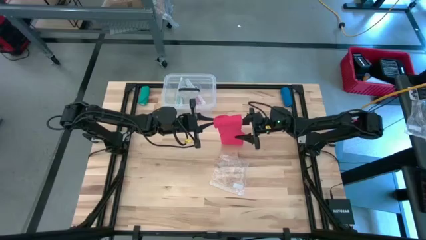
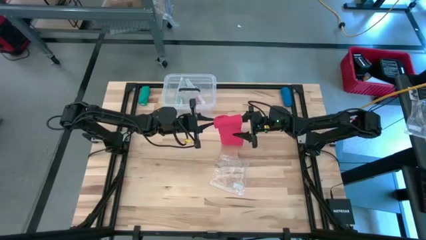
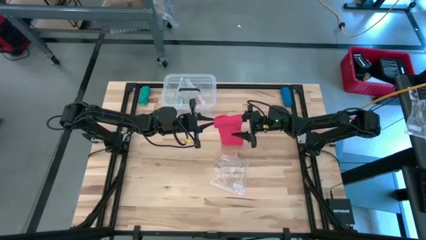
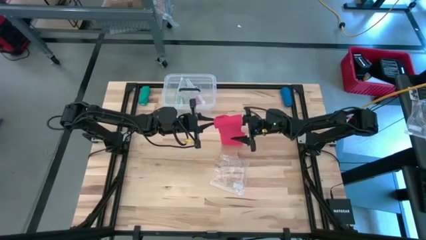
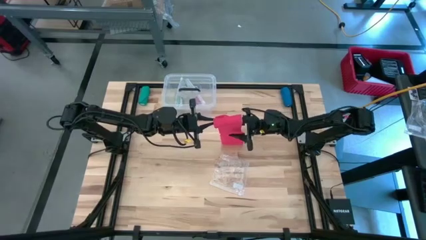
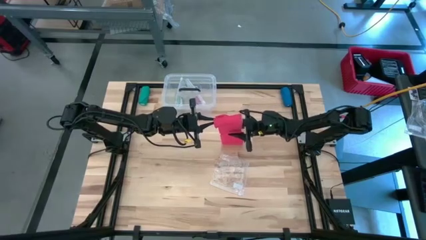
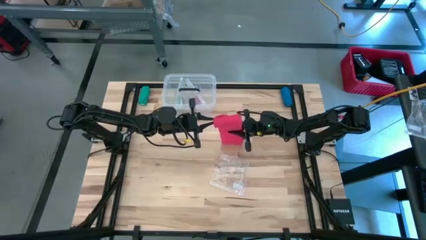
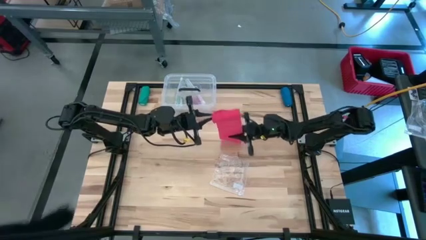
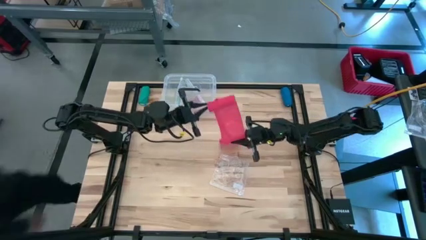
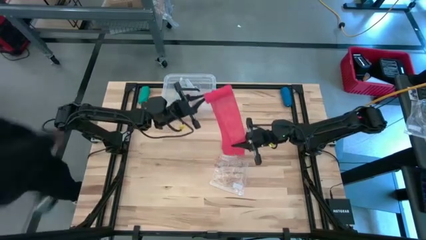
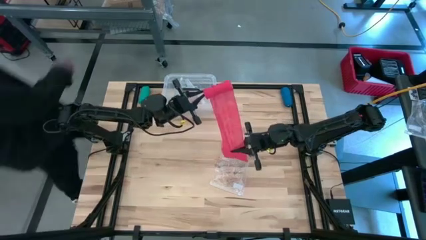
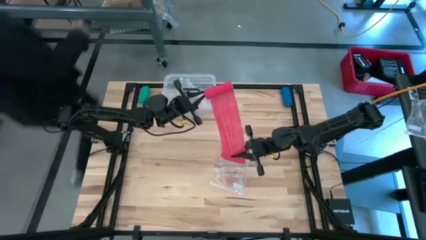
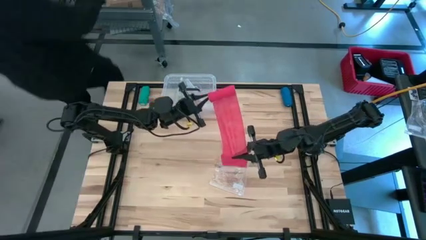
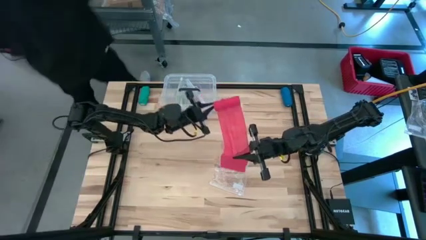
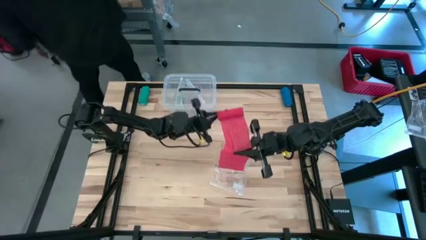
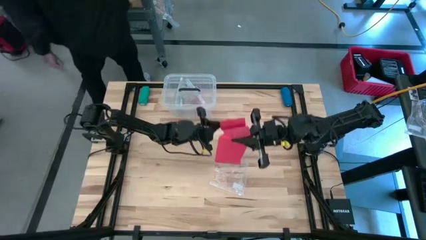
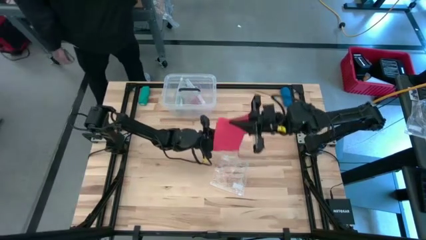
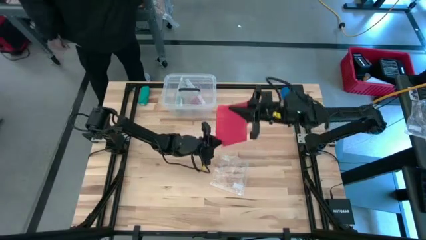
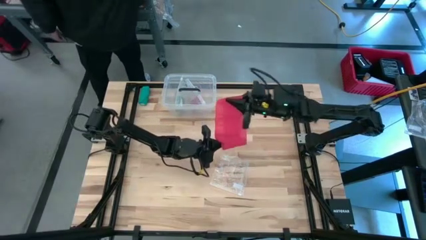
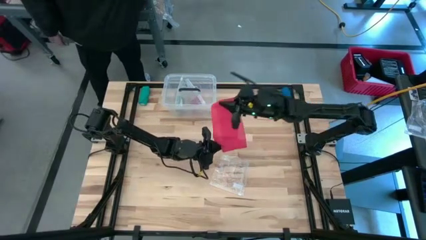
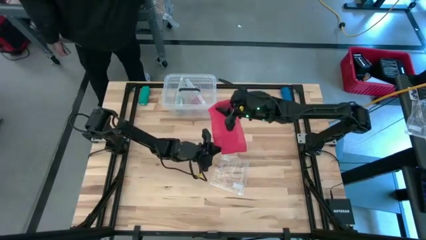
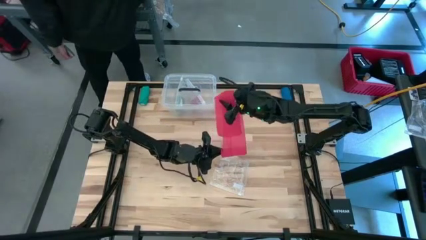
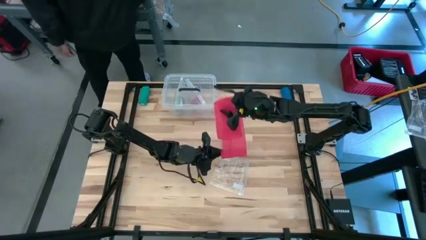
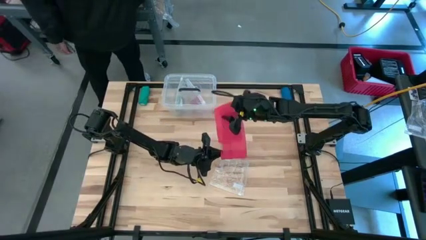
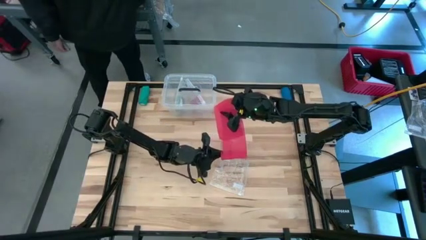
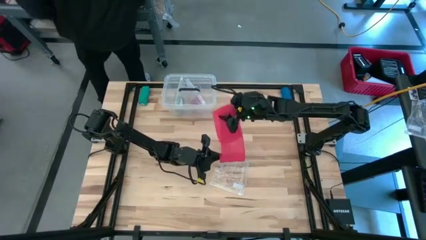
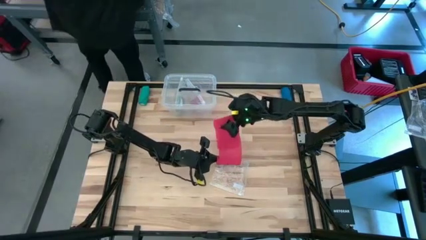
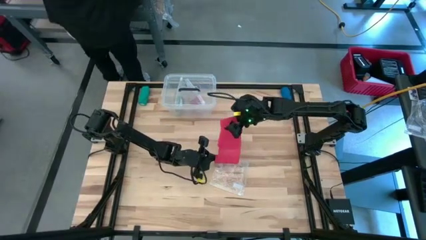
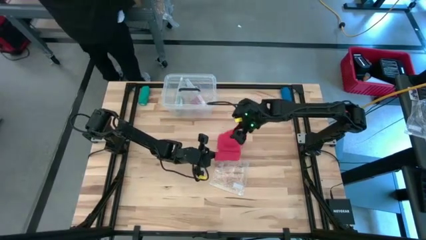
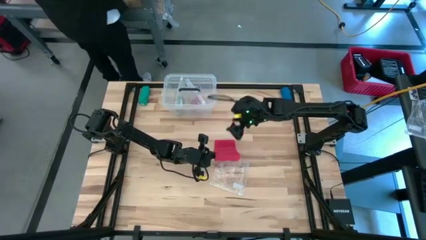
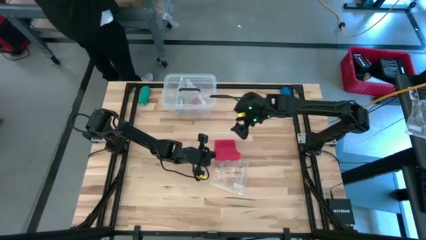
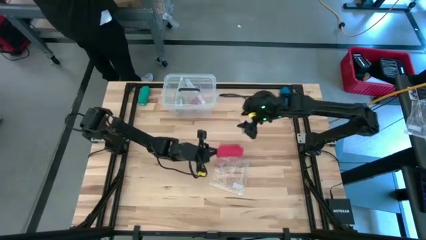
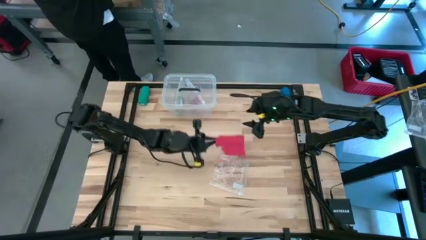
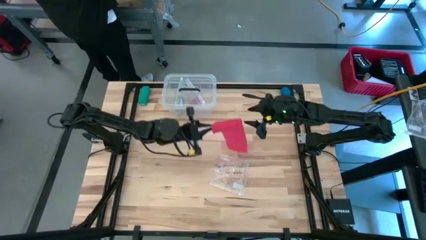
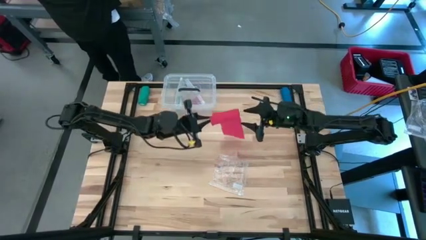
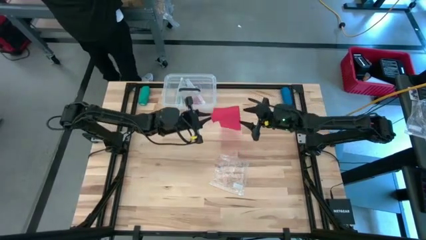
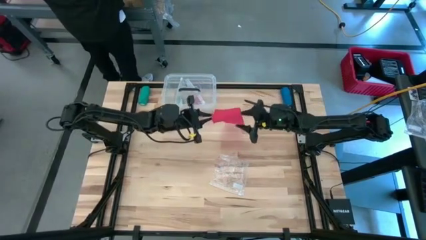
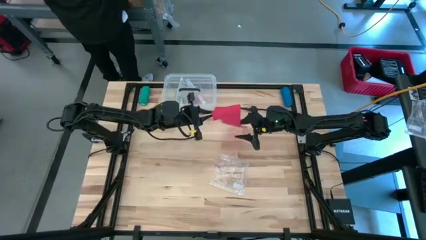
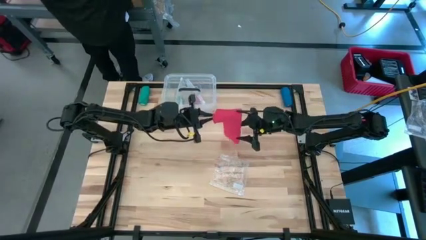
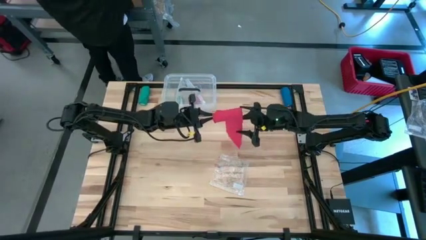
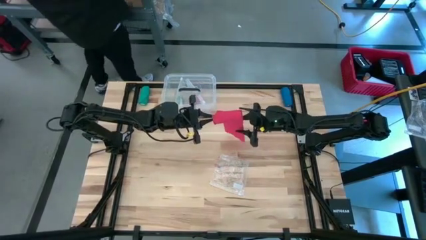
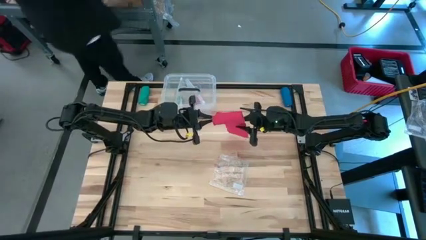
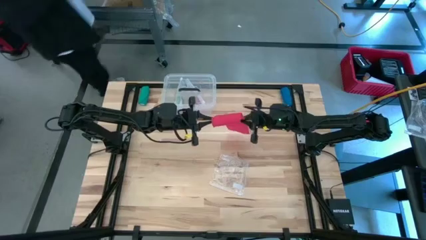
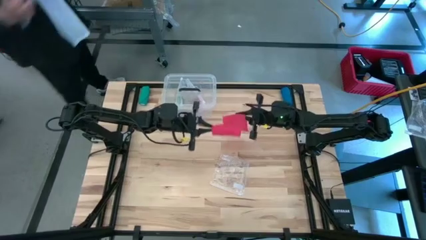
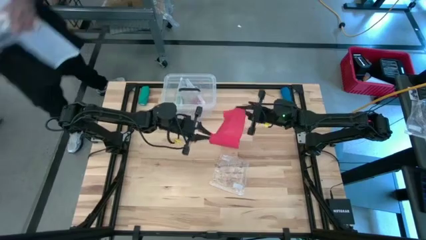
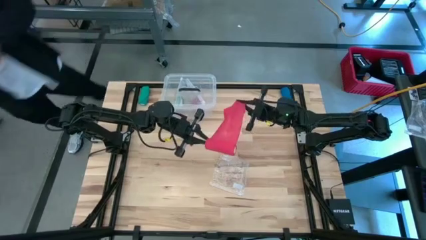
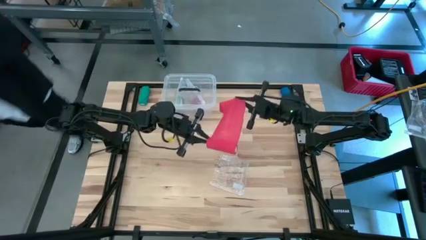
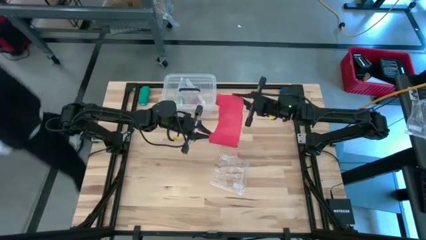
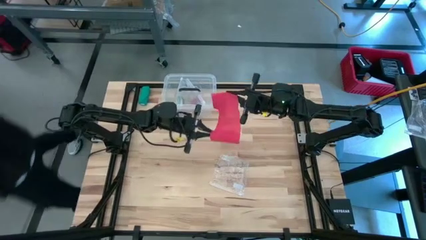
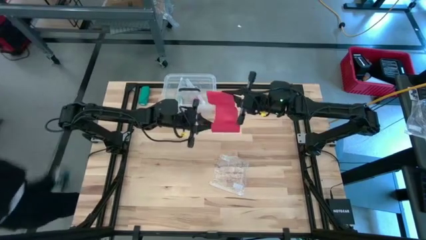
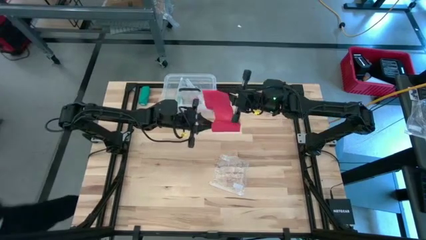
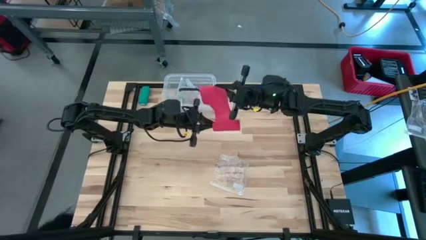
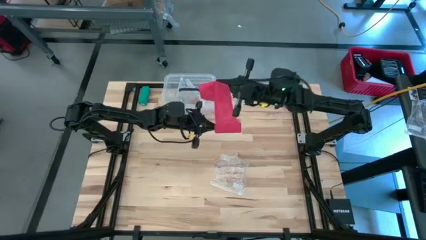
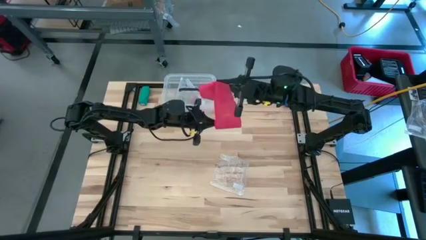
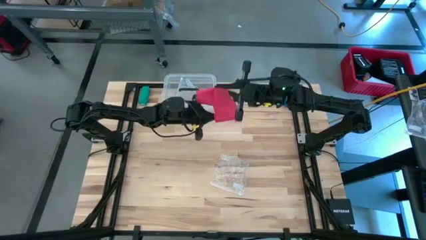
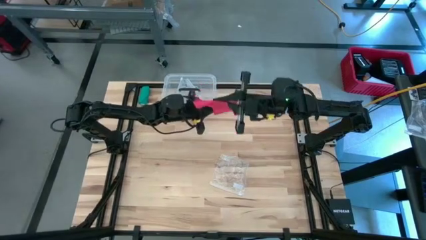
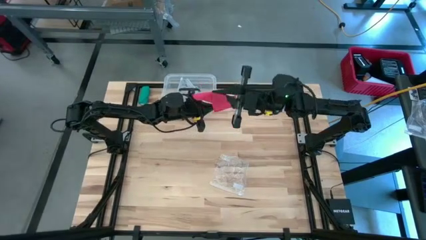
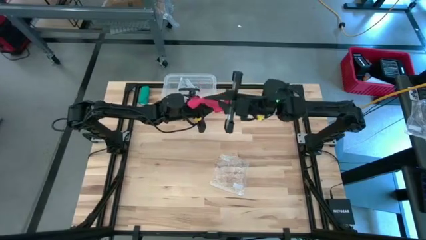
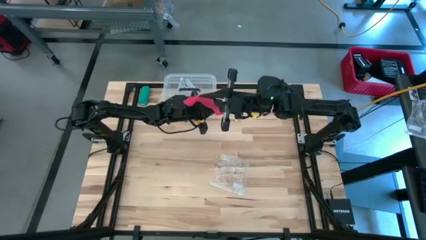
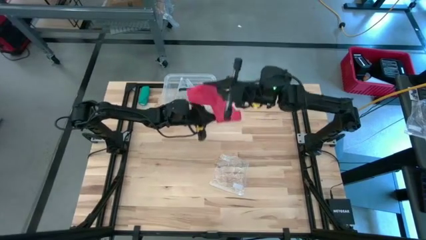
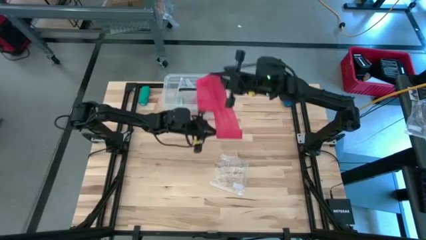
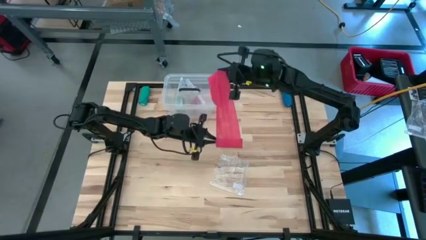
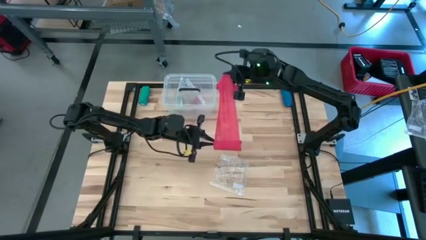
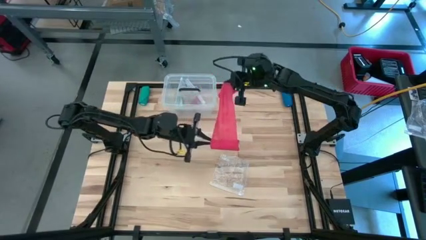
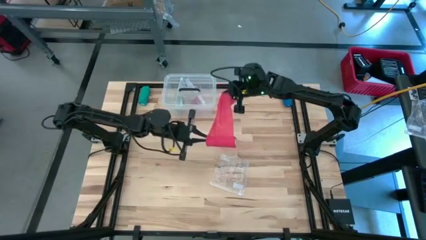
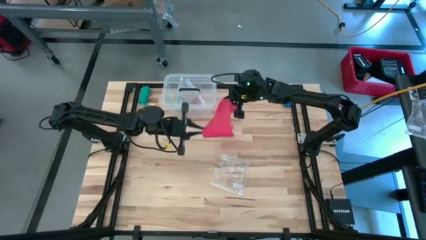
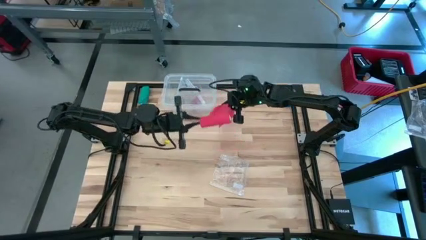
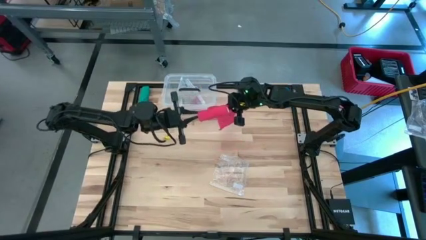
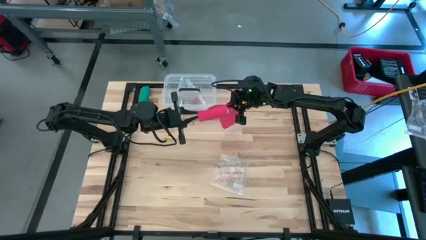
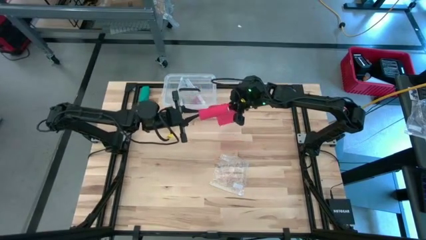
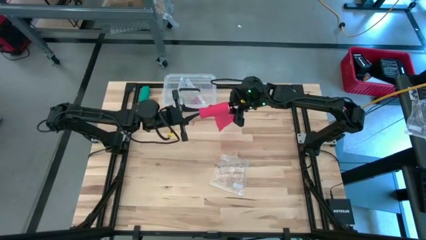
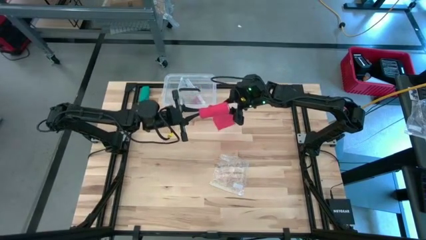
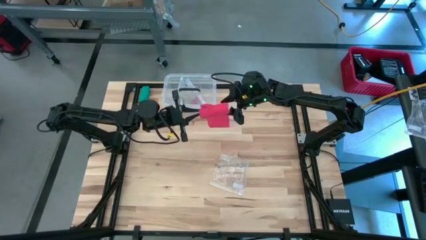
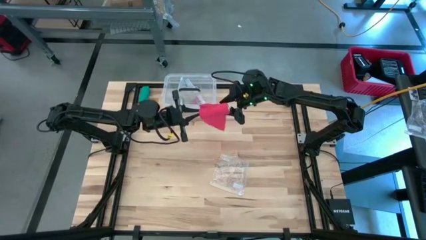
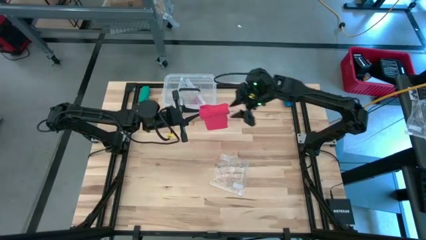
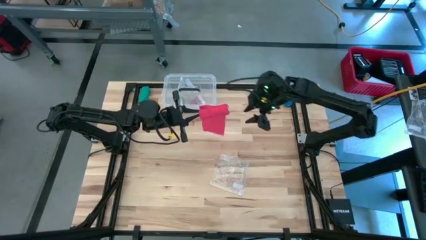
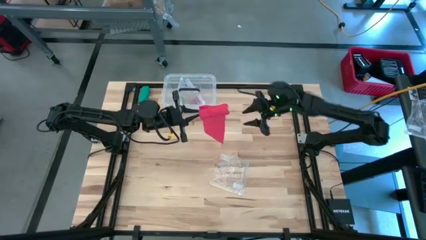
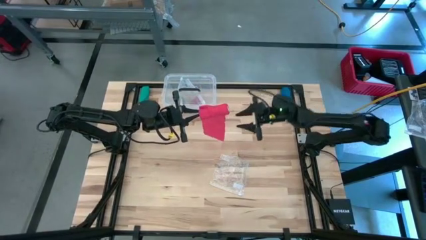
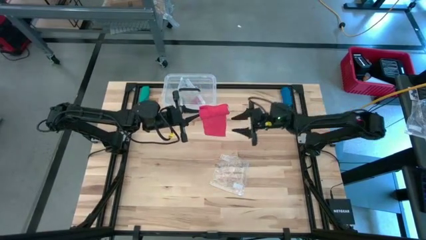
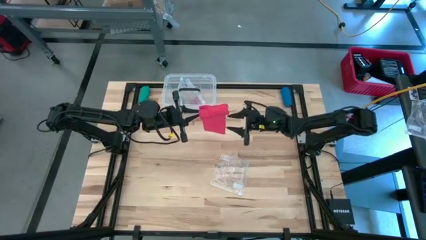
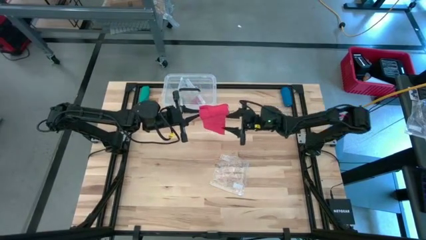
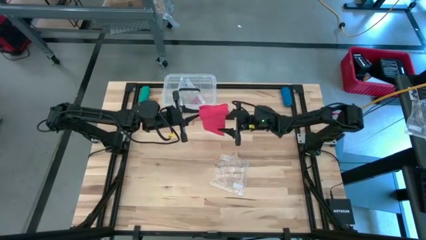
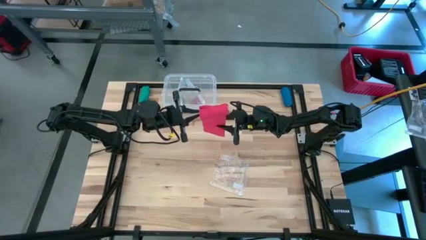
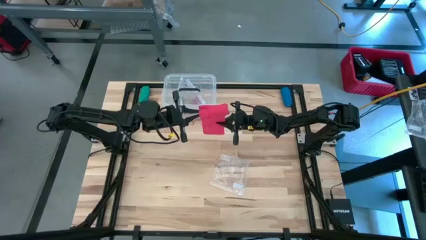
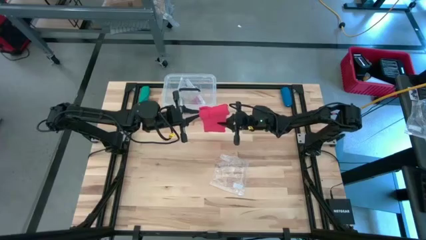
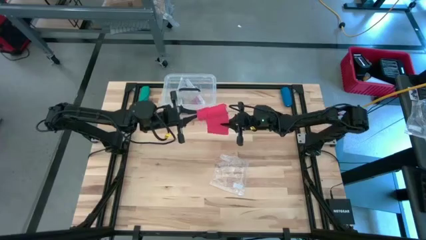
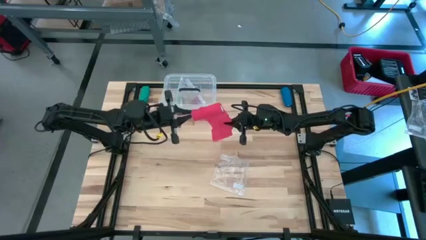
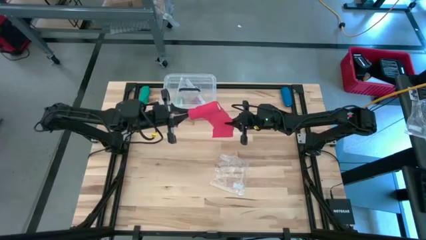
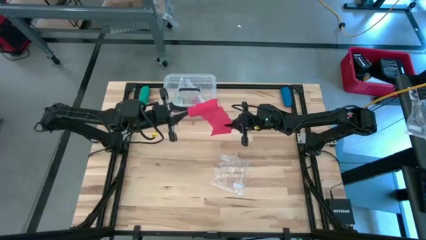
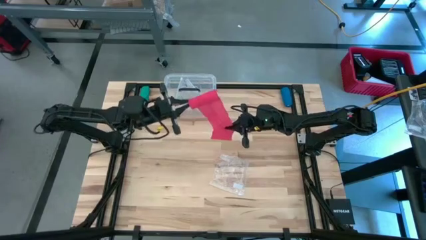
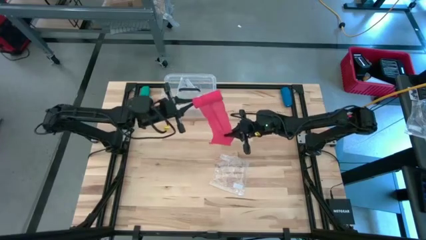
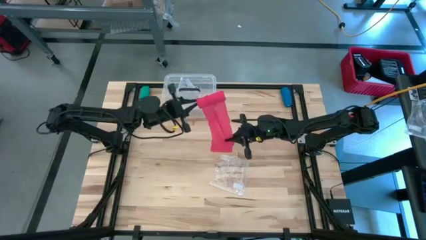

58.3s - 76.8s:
Task: Roll bandage
Roll the red bandage
